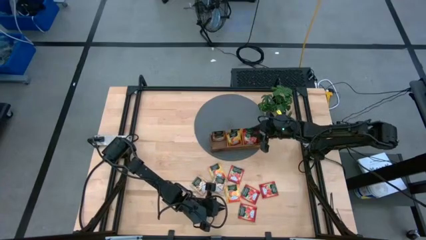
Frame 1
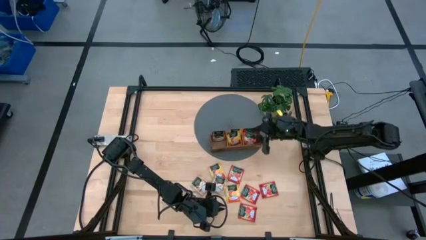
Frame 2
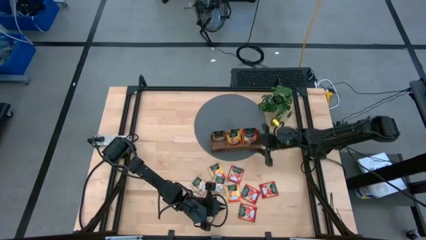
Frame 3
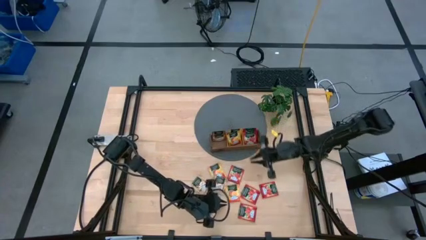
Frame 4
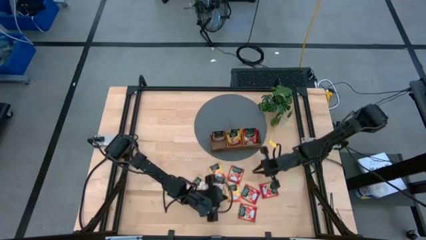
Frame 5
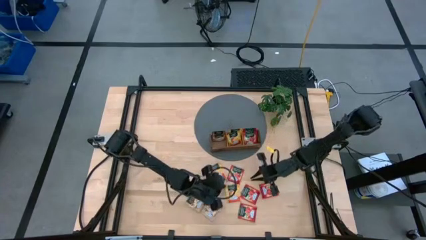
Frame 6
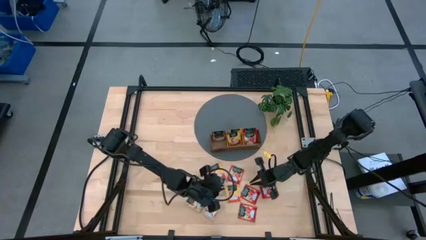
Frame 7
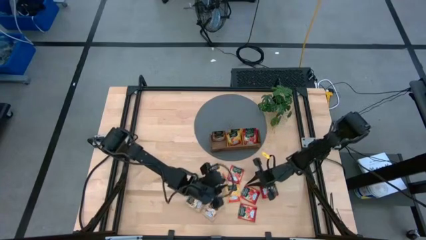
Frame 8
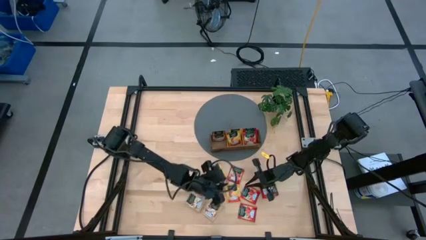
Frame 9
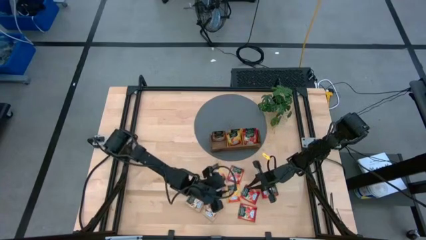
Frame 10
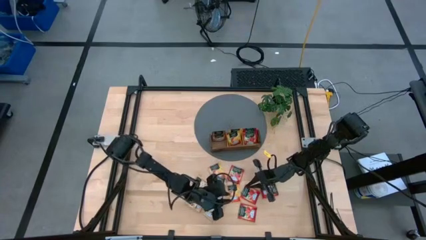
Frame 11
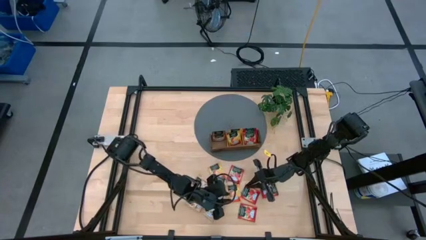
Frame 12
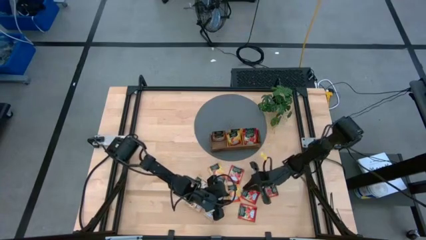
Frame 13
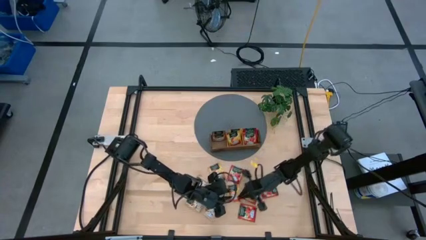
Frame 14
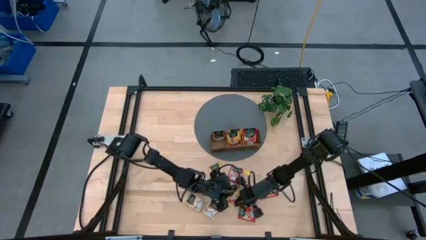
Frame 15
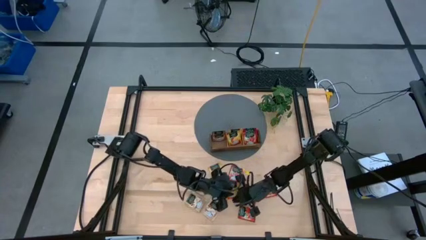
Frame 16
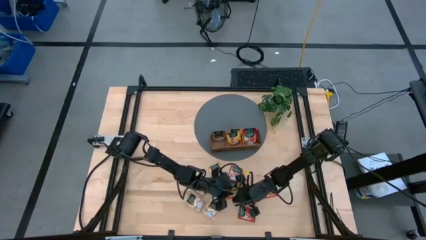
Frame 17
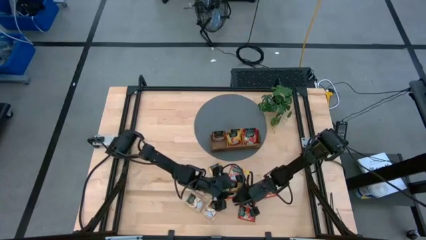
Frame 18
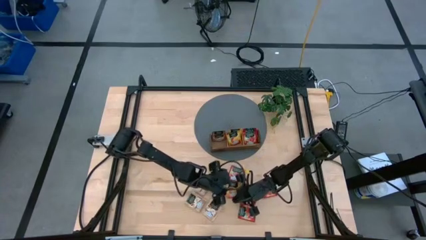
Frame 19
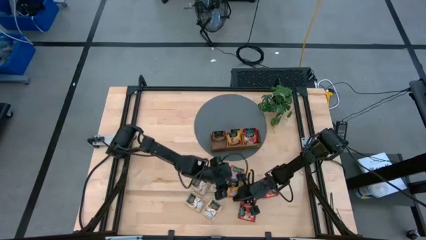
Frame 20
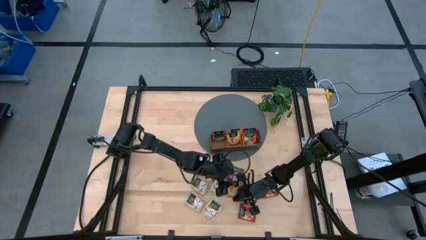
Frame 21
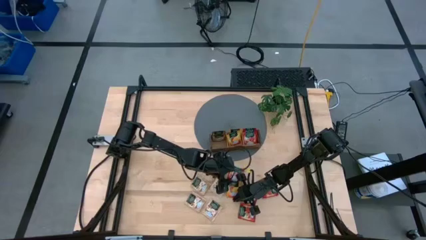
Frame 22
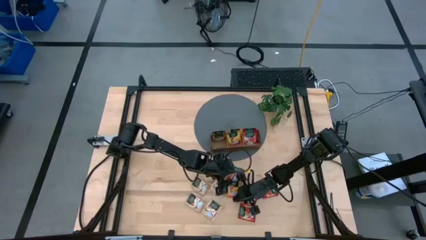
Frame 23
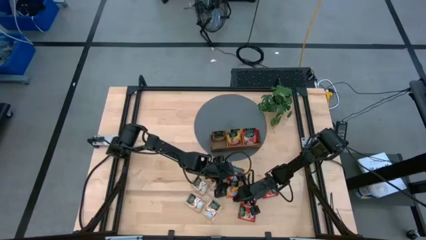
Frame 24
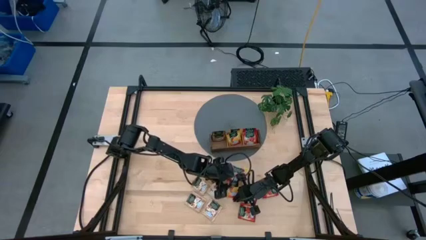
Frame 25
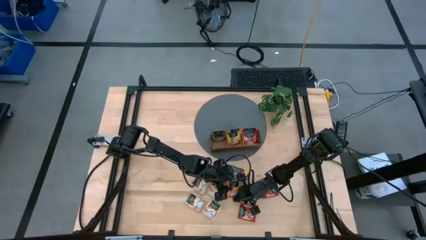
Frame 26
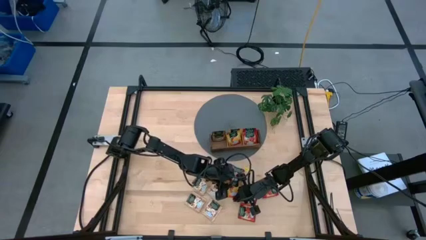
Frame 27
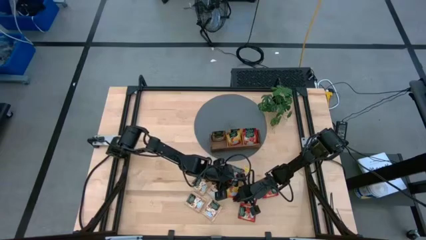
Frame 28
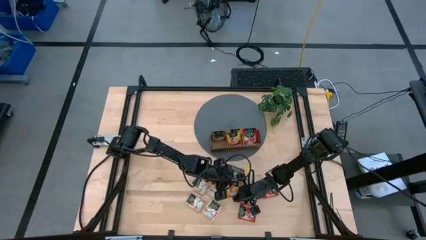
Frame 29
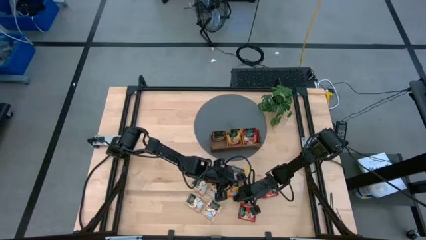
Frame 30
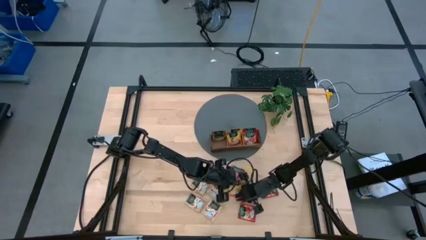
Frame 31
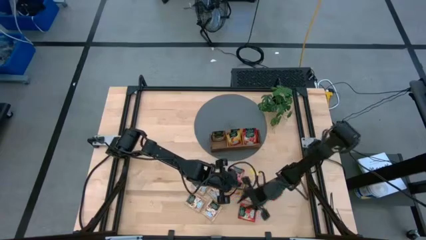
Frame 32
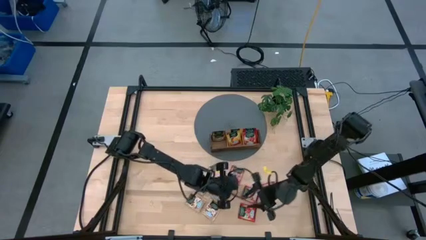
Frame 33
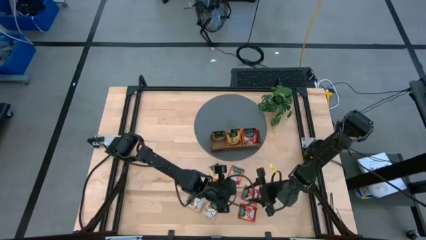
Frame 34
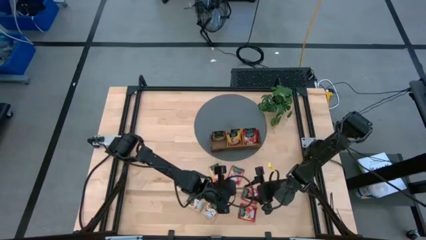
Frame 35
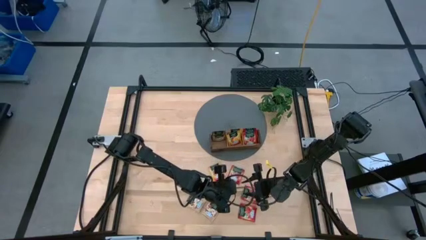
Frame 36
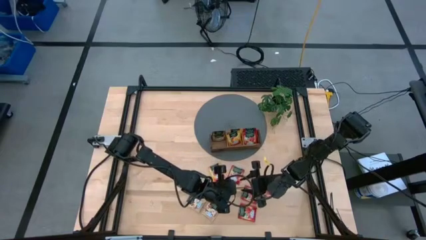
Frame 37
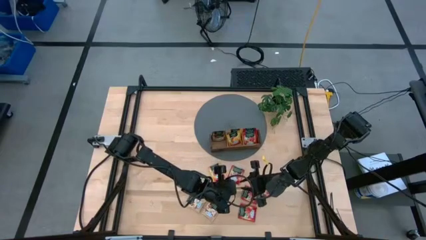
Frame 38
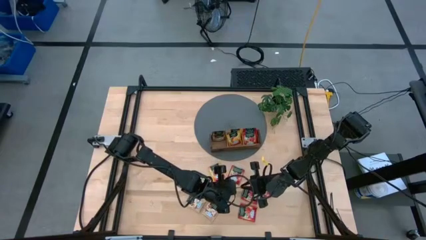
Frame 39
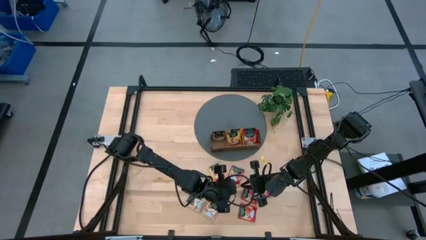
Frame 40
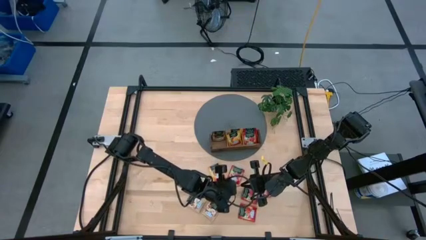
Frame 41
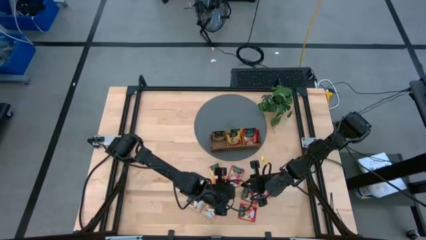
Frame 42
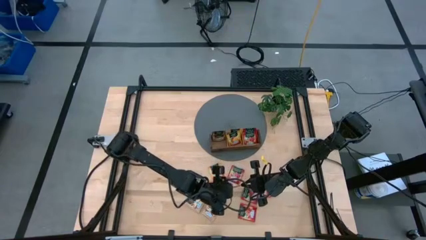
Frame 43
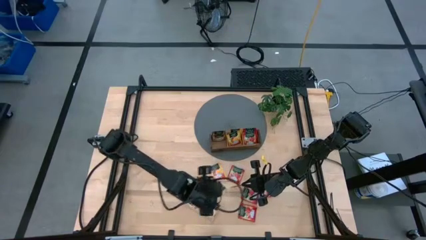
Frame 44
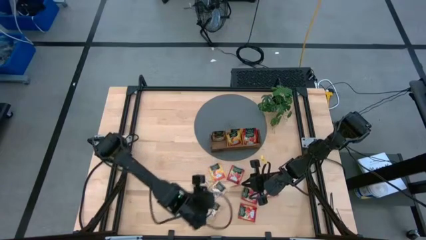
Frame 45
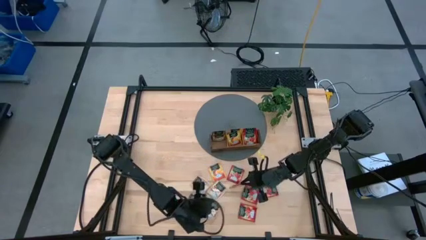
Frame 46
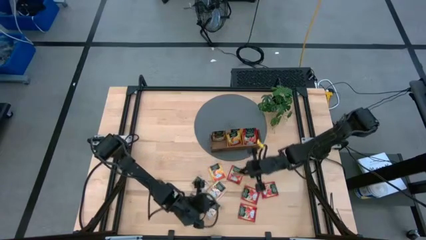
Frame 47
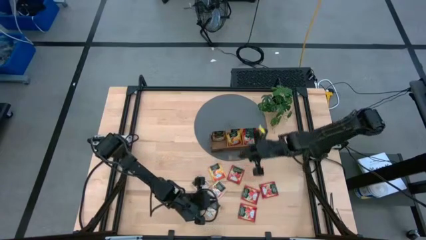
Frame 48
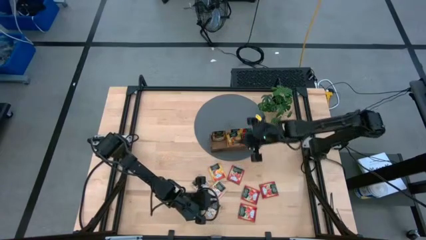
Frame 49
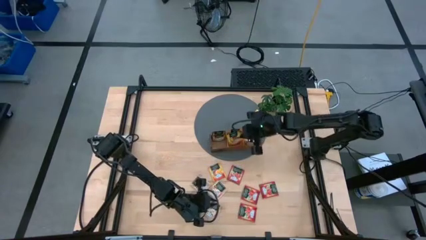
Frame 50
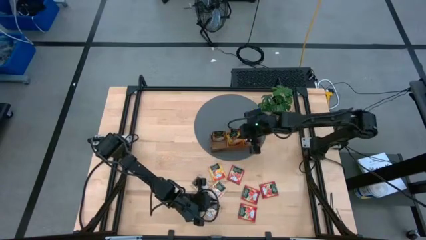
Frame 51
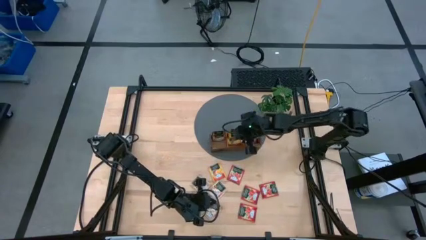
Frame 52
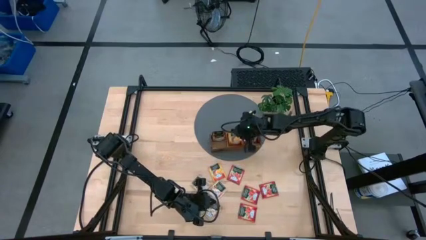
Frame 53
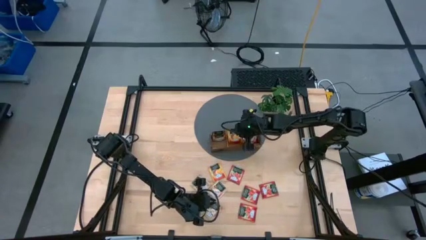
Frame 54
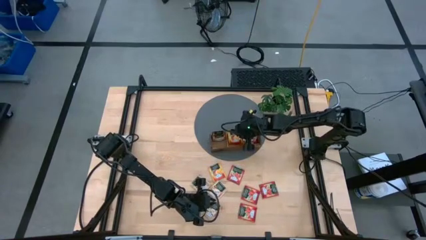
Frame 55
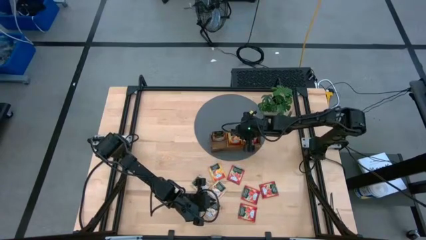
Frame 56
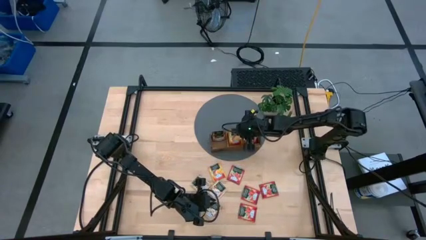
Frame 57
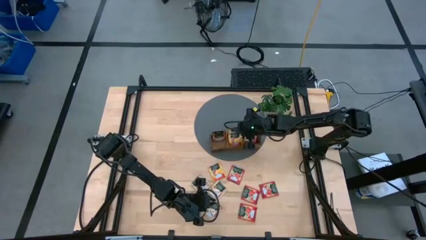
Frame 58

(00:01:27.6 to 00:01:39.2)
Task: Pick & Place Tea
Put the orange tea bag into the middle section of the wooden organizer

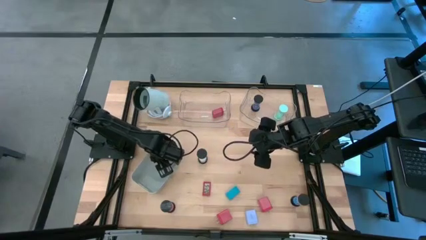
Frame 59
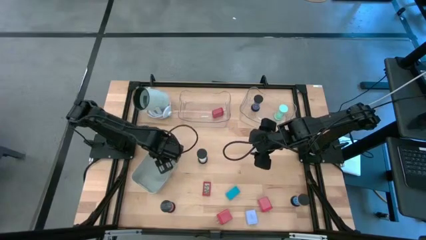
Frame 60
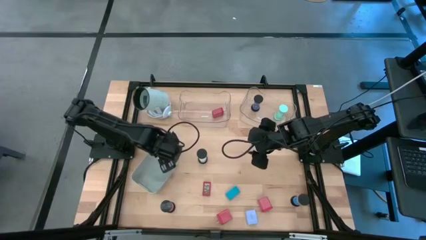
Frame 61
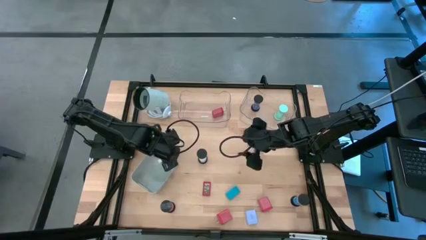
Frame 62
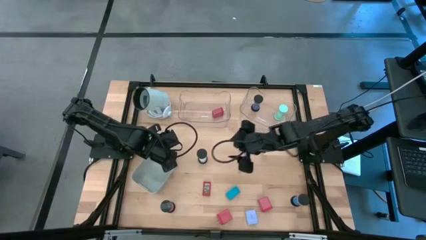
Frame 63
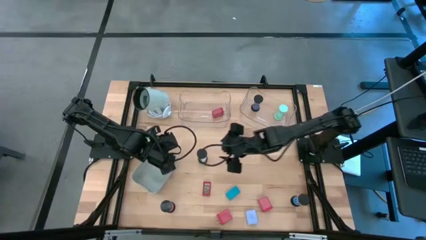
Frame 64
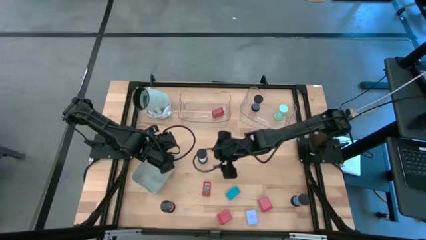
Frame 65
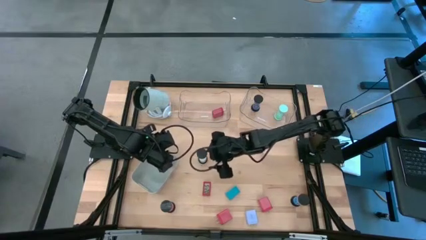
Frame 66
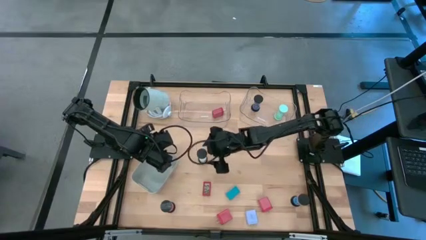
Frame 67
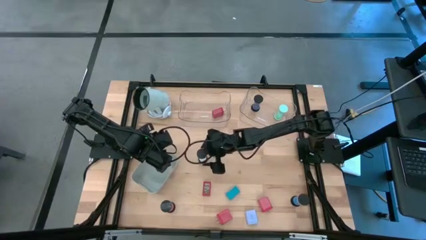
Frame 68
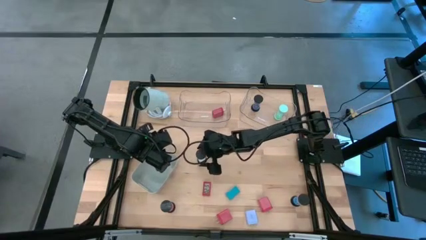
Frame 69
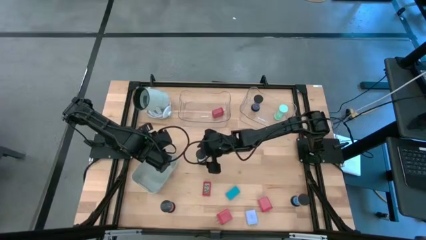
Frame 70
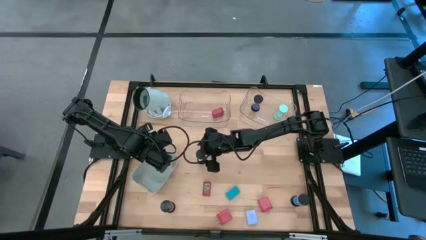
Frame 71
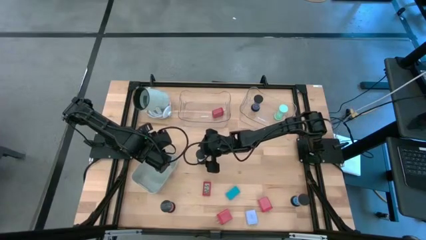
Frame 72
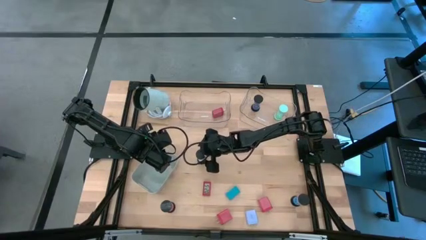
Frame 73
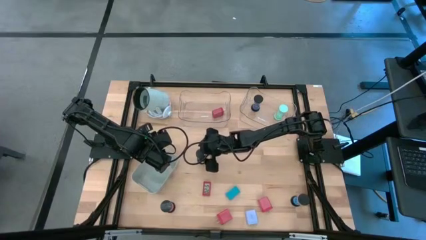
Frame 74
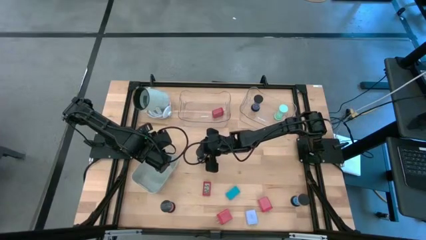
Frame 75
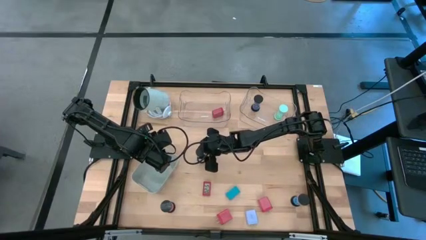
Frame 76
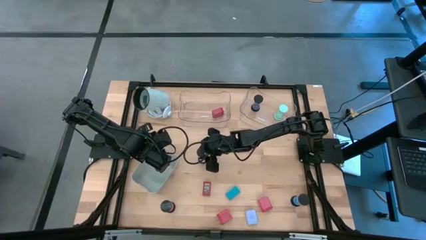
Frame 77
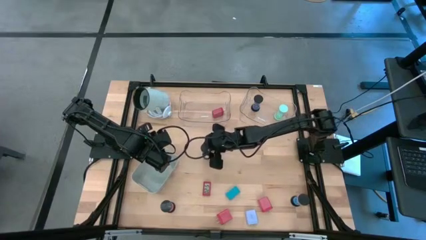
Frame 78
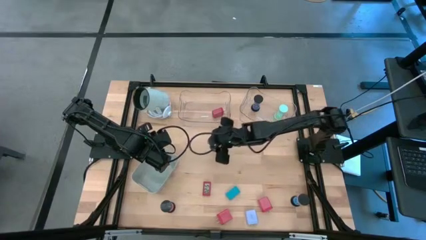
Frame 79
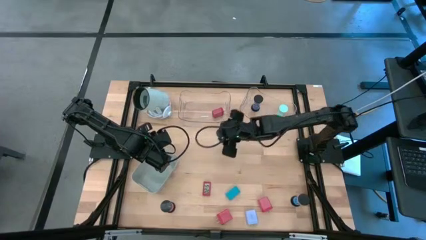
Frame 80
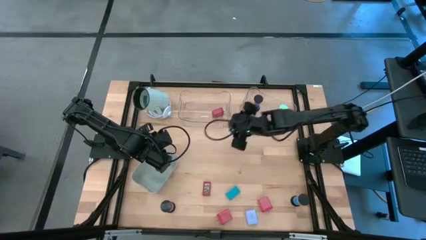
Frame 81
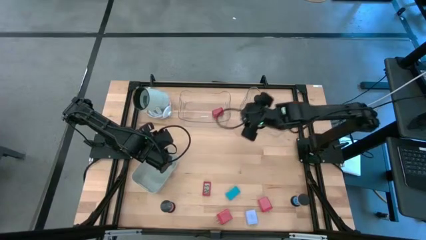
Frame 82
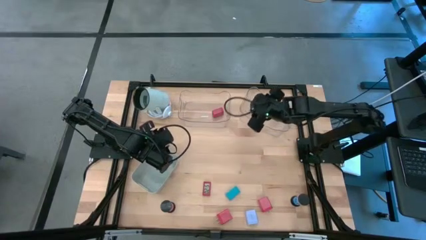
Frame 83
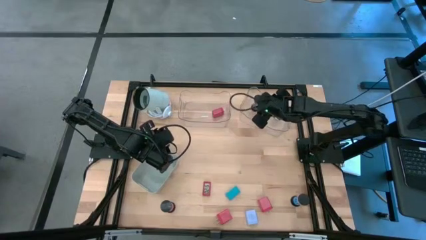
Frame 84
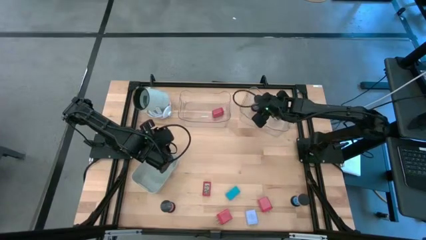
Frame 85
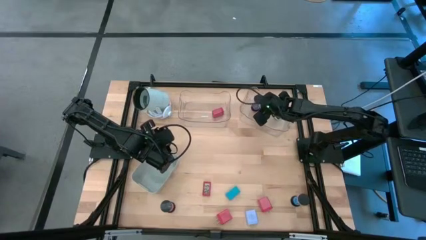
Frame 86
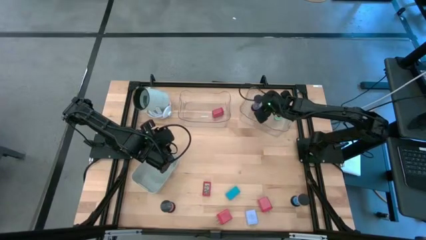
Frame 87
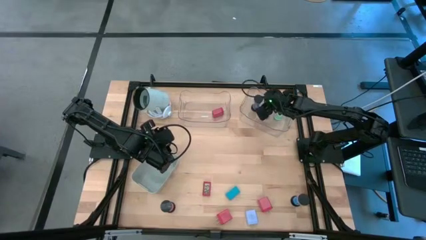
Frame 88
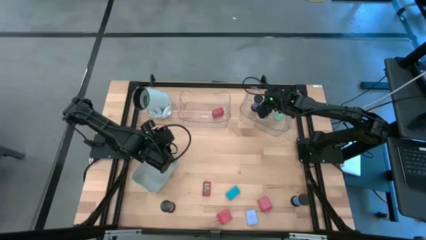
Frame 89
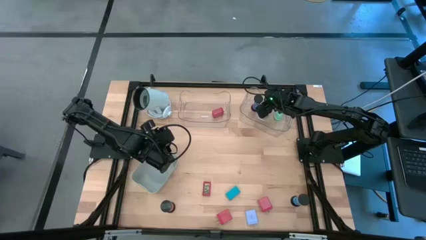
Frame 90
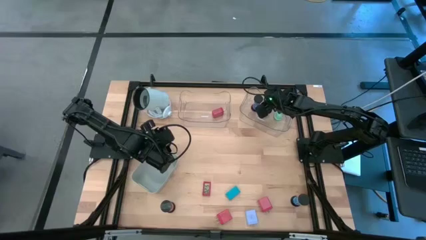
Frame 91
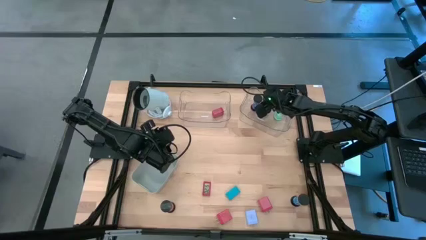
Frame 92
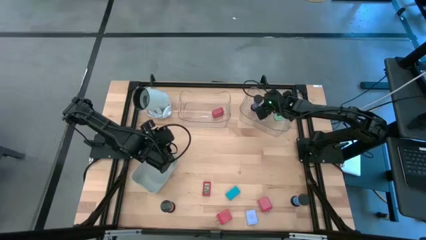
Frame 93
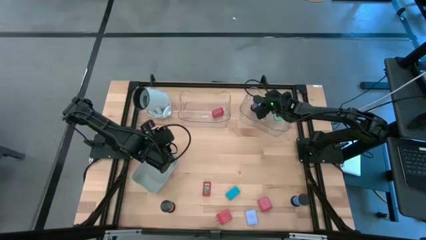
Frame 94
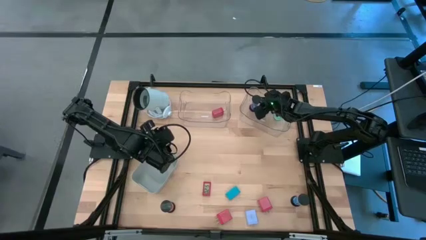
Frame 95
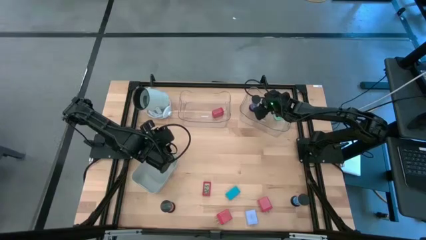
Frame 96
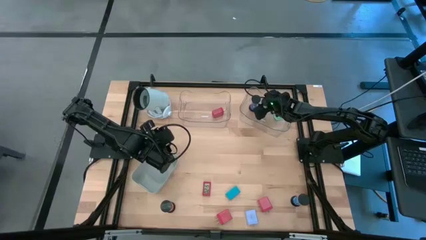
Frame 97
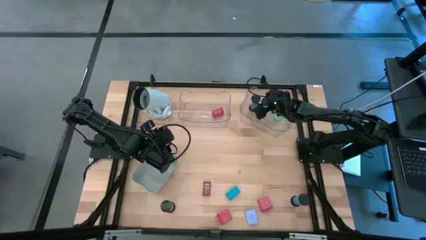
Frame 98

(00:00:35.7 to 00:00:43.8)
Task: Pick & Place Office items
Put the white hourglass into the right transparent bin
